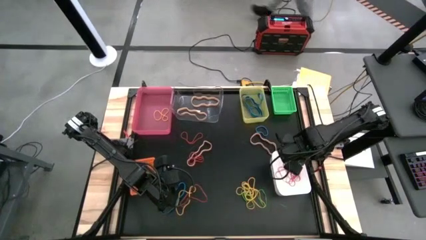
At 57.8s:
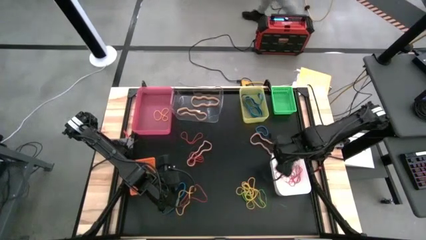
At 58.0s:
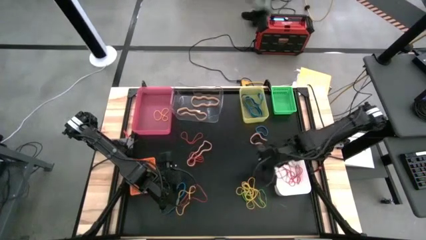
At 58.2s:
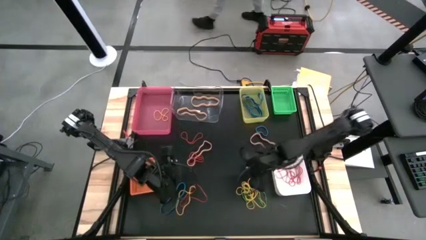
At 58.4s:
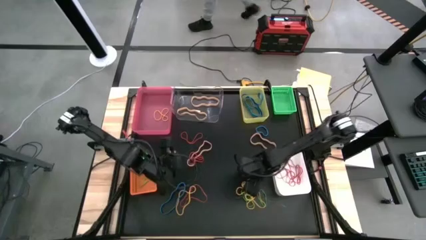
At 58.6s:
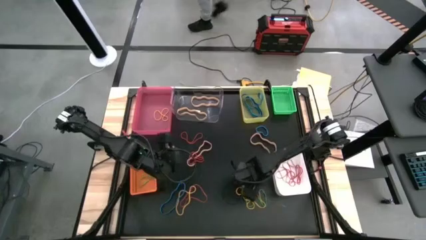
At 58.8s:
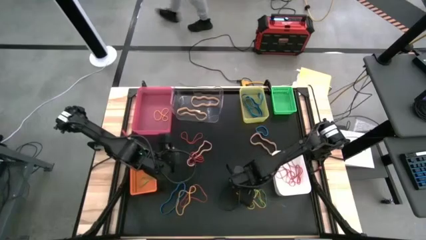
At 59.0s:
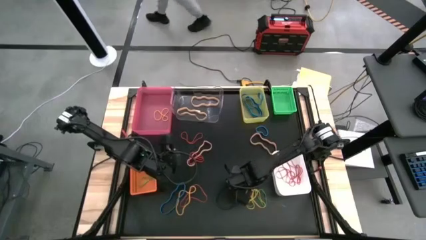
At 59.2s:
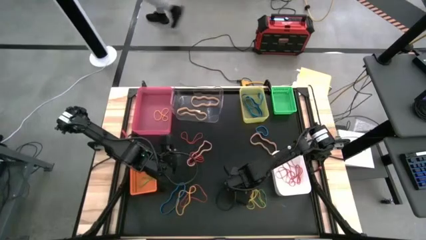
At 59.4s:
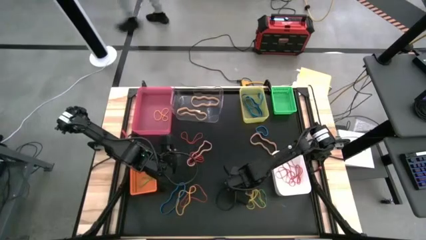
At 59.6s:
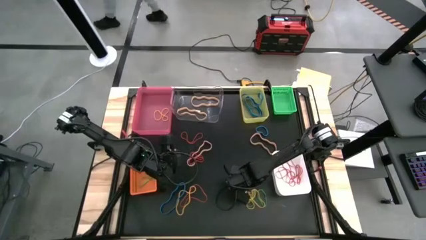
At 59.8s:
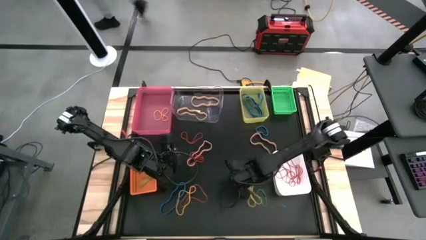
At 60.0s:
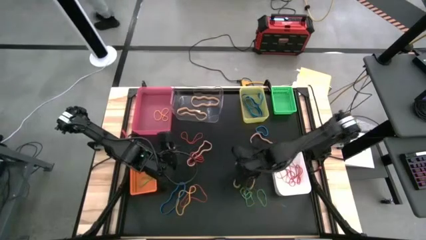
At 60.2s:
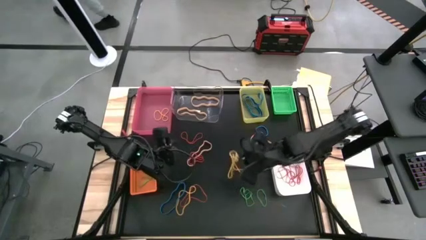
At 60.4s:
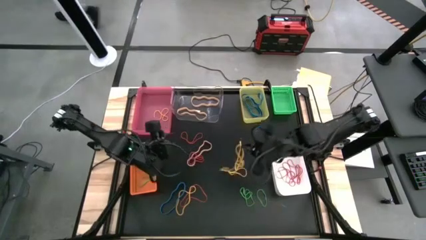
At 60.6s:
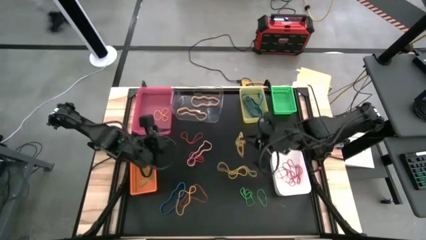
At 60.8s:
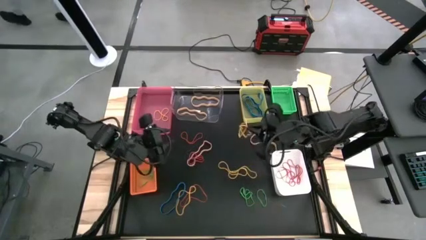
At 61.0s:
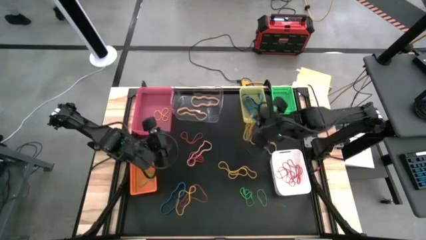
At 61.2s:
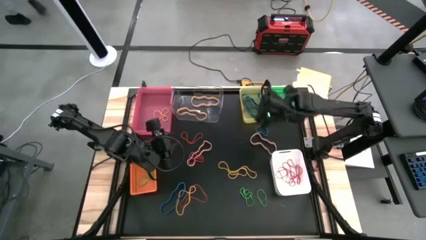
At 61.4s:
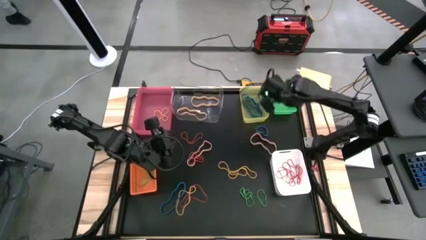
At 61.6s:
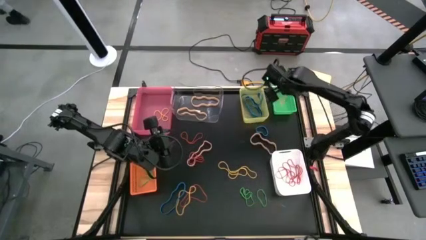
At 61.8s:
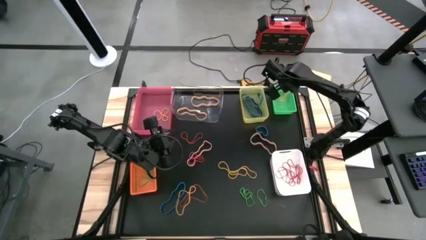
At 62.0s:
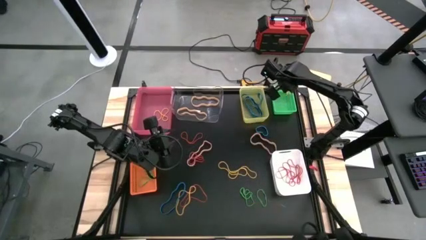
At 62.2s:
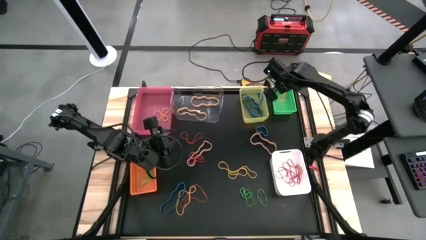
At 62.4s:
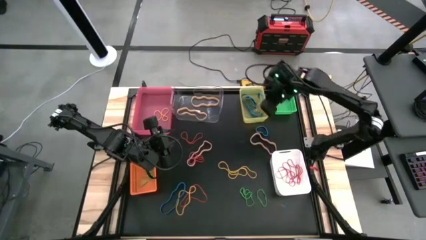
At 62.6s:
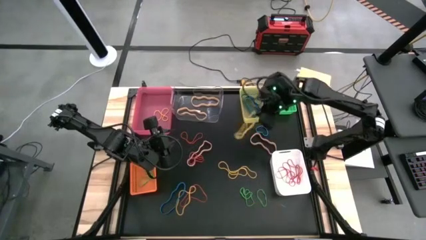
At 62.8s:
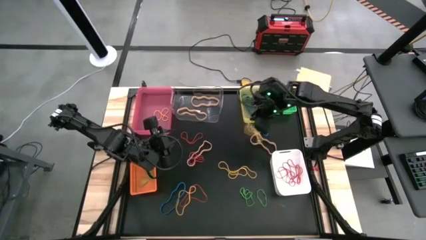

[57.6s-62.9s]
Task: Sort rubber bands into baskets
Put the yellow rubber band into the green bin

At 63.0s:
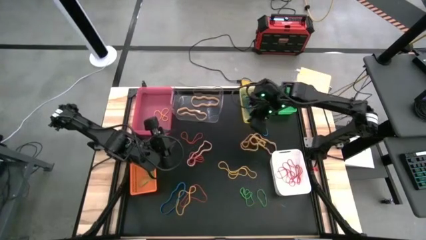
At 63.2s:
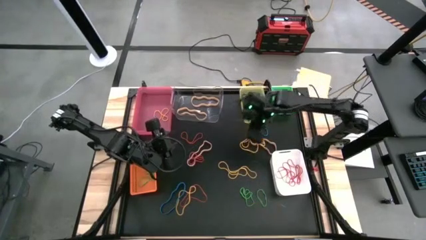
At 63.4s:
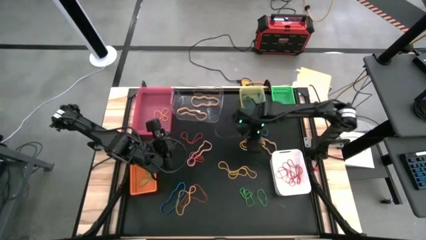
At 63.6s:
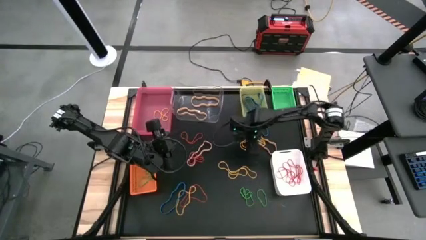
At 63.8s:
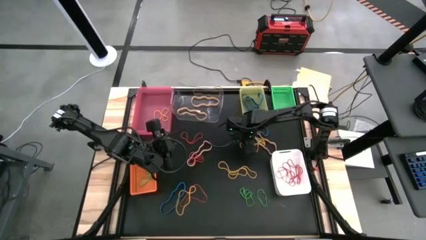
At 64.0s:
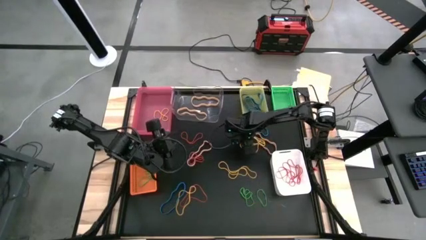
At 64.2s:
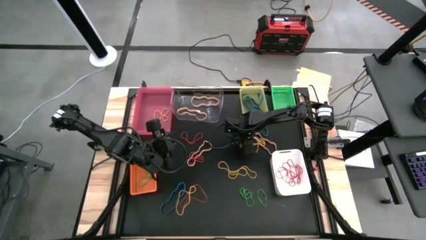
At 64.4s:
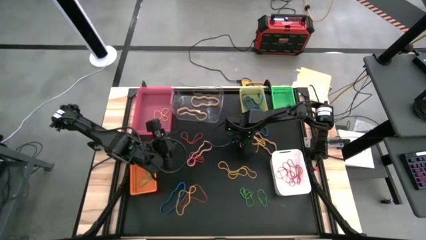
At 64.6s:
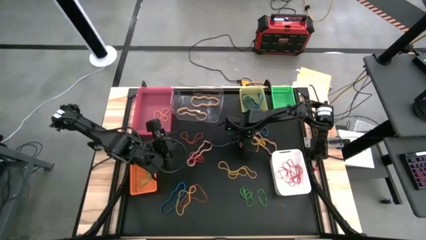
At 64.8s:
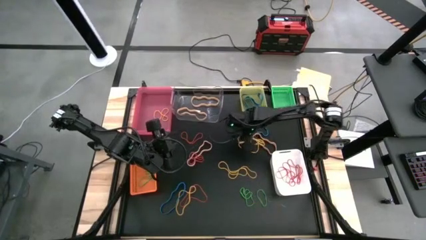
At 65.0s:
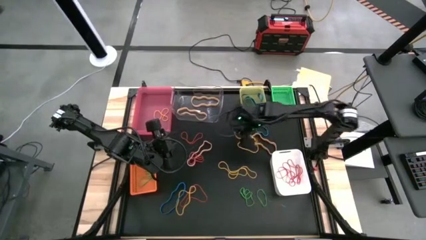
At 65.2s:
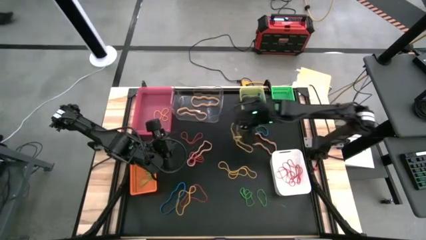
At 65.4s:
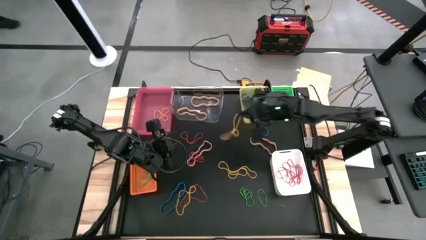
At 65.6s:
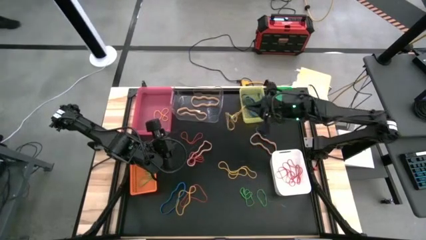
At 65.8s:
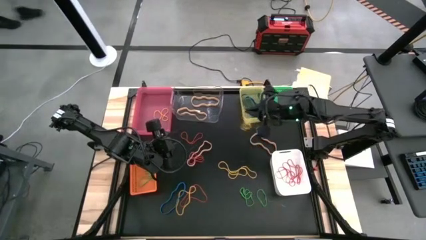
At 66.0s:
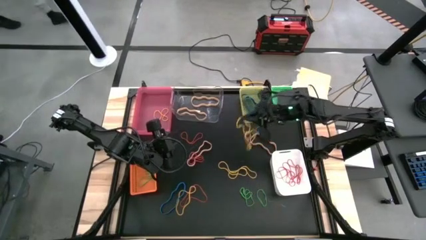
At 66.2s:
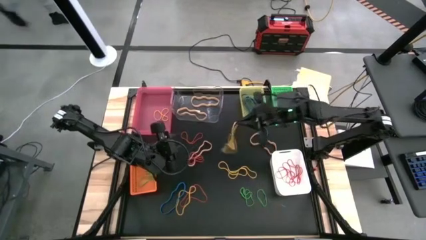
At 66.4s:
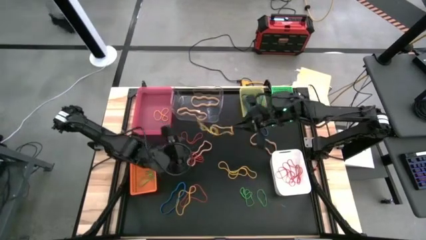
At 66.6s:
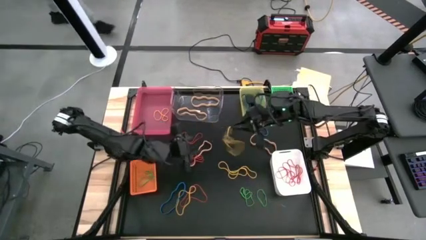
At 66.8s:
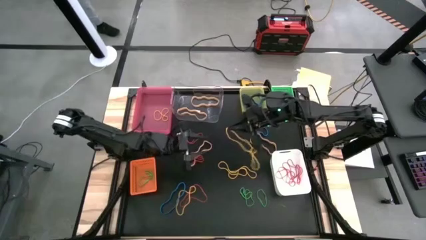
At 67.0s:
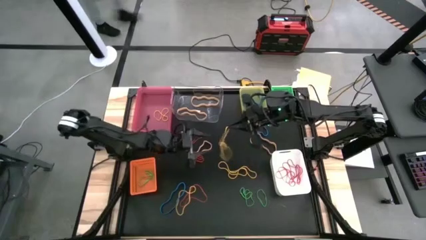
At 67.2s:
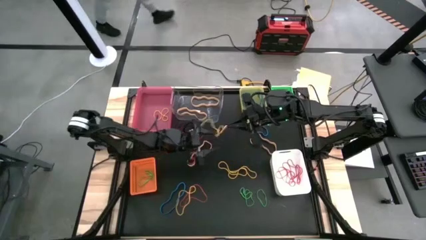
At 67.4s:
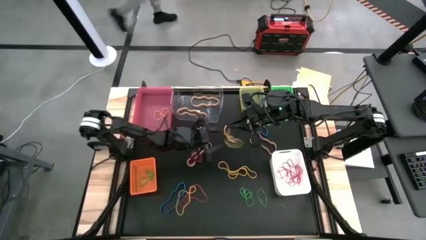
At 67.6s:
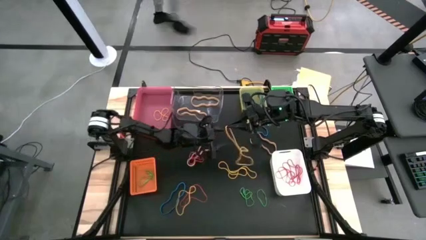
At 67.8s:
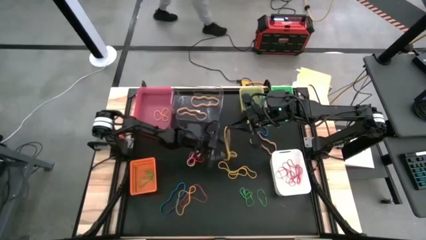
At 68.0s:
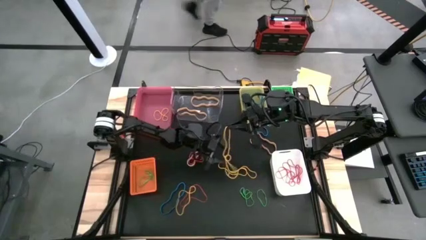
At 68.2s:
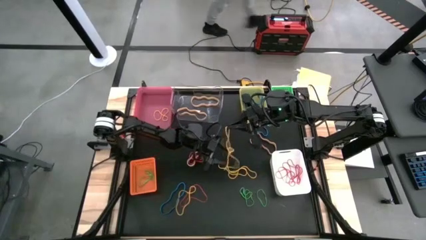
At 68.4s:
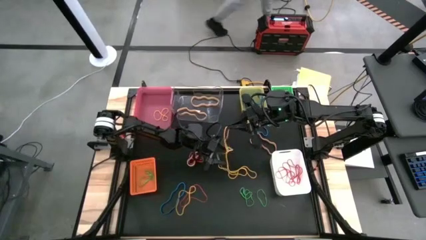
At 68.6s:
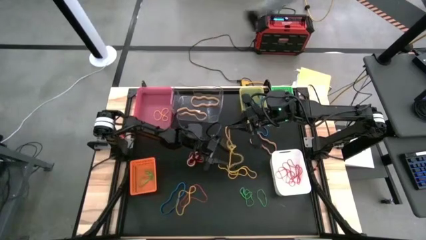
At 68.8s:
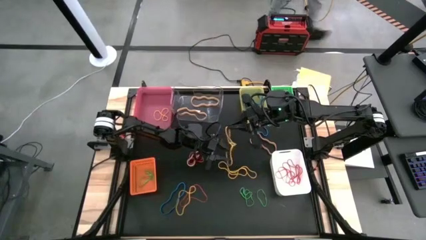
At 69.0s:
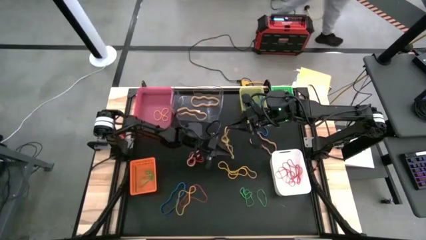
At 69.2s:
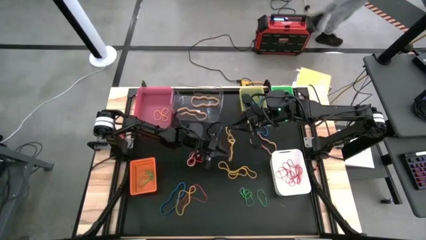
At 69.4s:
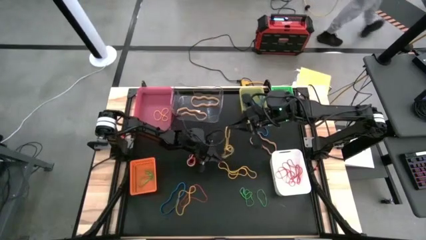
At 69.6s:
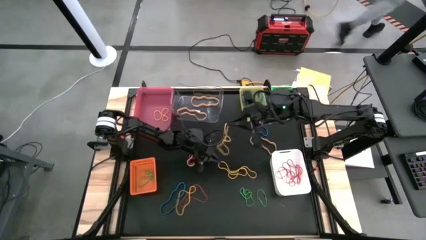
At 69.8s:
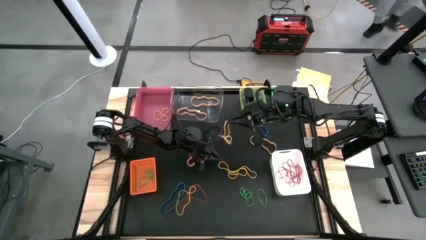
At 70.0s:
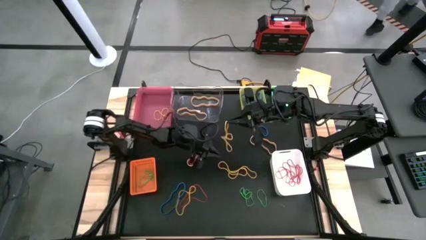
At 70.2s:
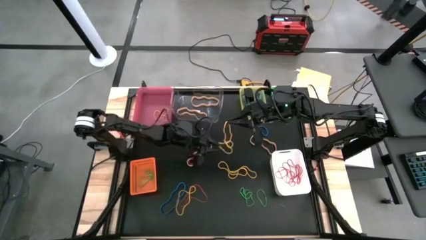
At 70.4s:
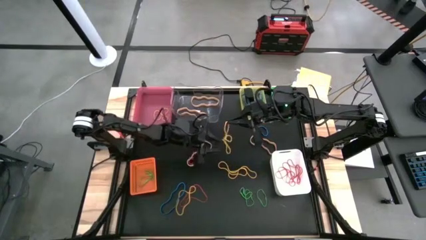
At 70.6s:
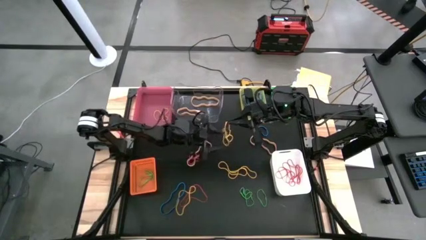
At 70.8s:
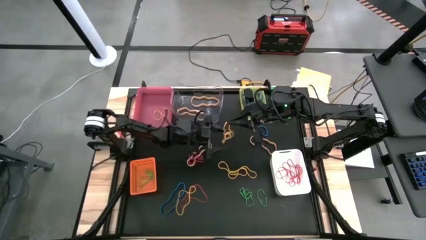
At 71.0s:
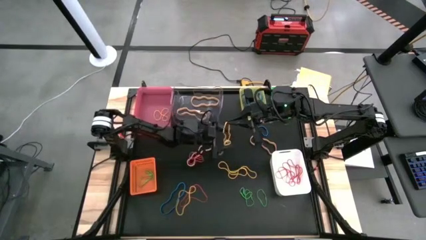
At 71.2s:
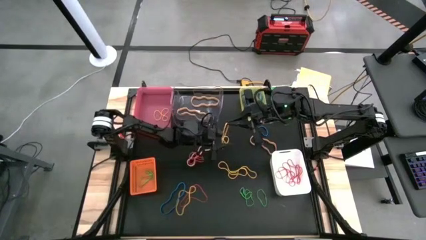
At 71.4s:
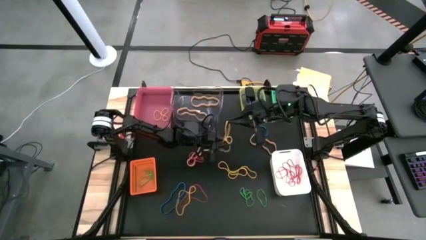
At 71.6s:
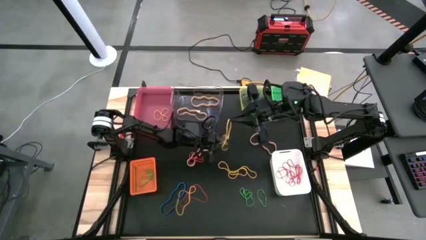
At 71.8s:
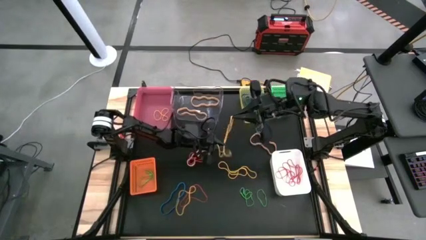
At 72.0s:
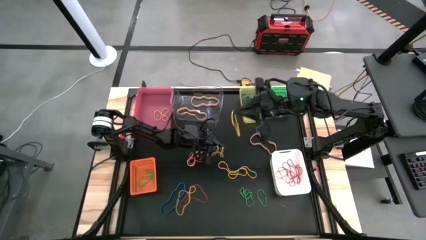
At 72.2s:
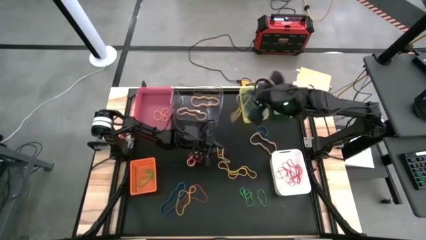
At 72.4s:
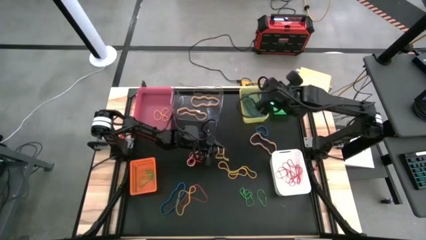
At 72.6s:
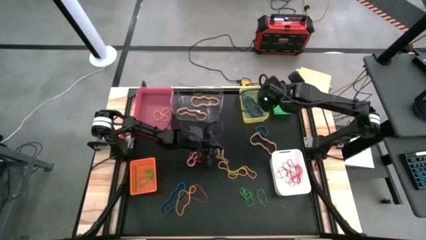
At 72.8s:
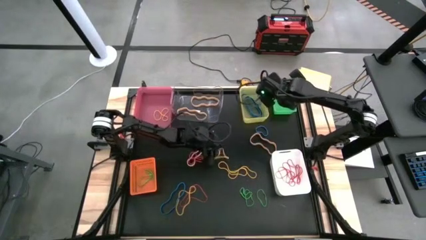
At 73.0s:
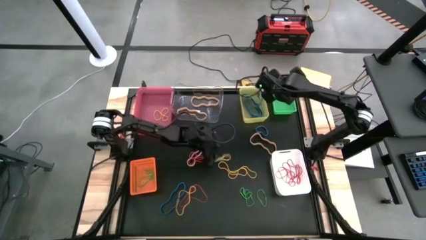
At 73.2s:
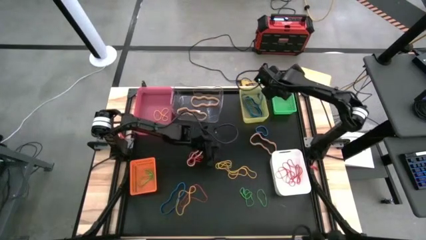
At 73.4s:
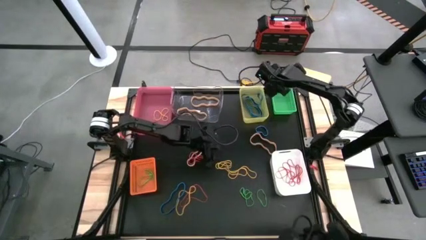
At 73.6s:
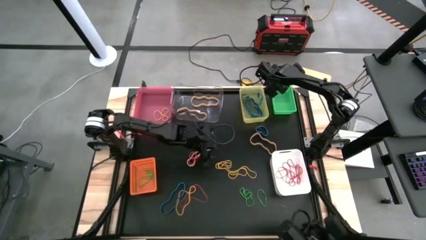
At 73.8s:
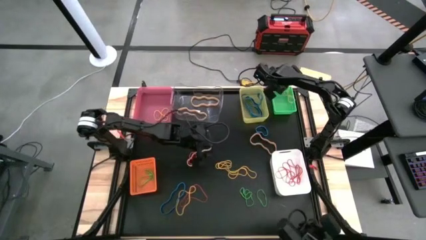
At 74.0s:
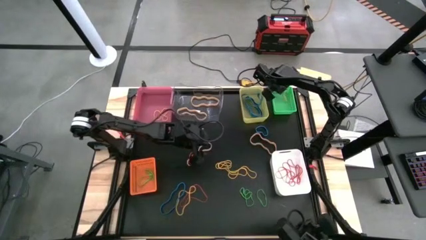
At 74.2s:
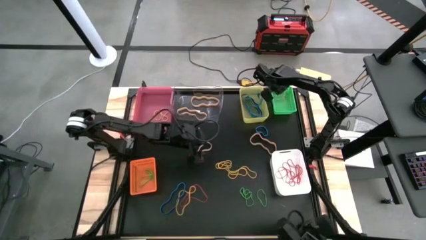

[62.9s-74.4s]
Put the yellow rubber band into the pink bin
